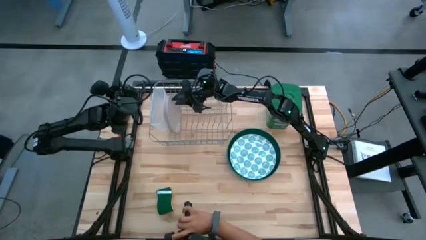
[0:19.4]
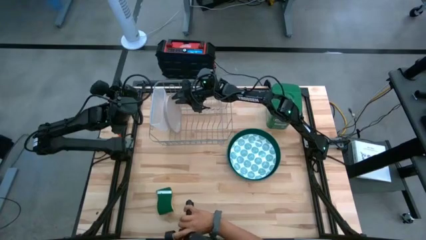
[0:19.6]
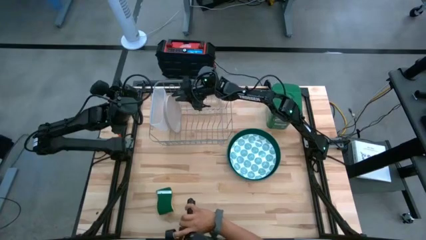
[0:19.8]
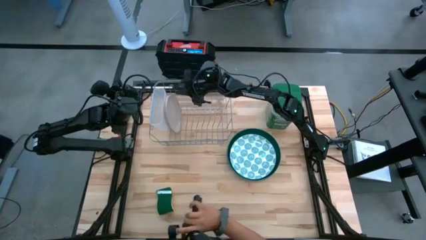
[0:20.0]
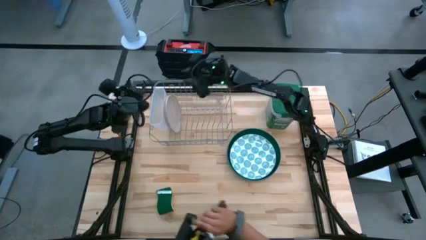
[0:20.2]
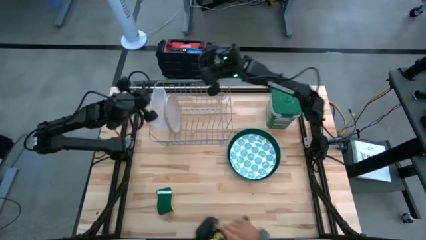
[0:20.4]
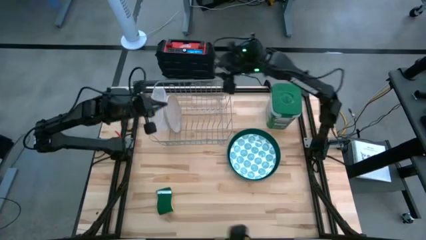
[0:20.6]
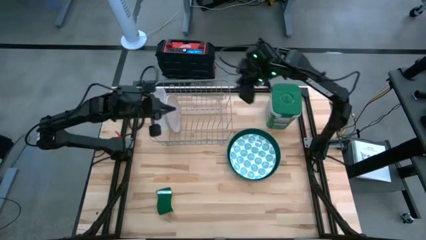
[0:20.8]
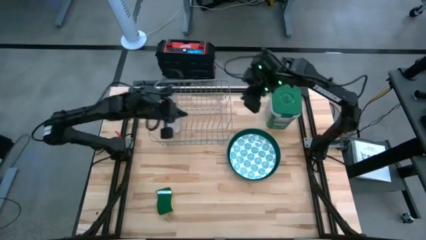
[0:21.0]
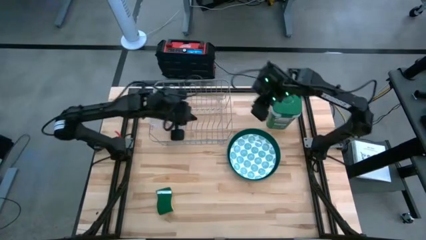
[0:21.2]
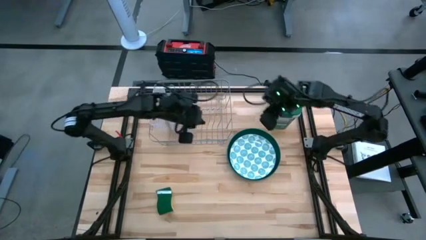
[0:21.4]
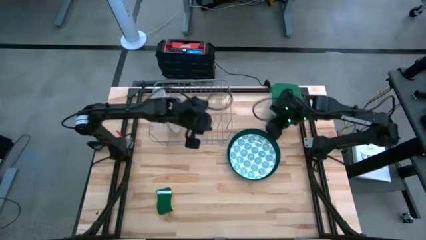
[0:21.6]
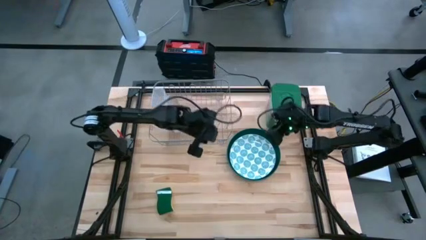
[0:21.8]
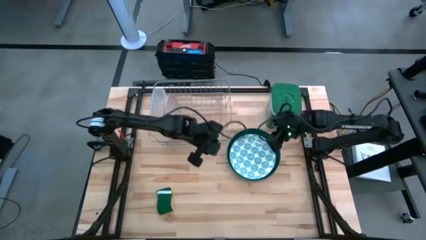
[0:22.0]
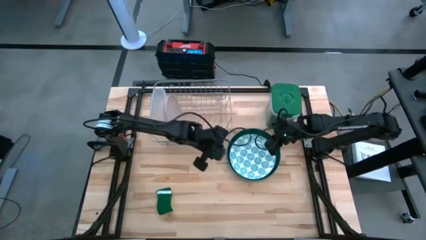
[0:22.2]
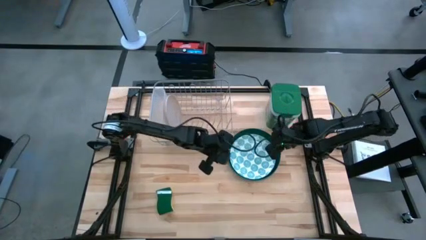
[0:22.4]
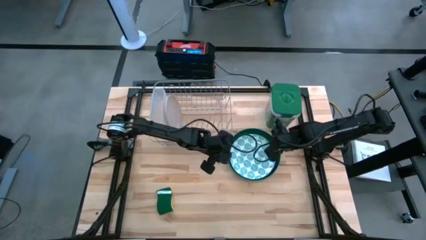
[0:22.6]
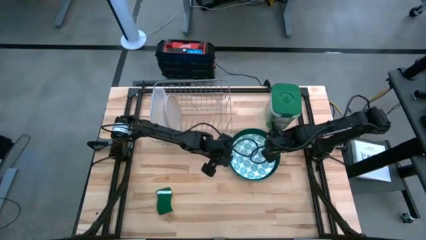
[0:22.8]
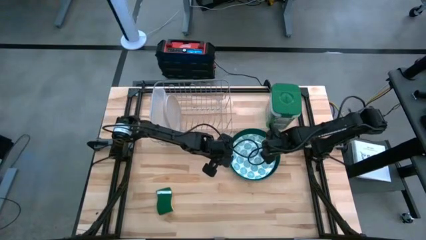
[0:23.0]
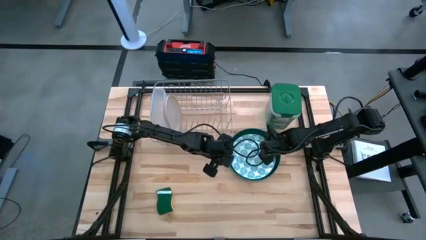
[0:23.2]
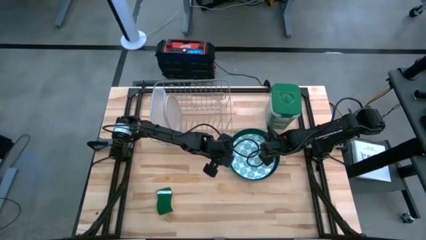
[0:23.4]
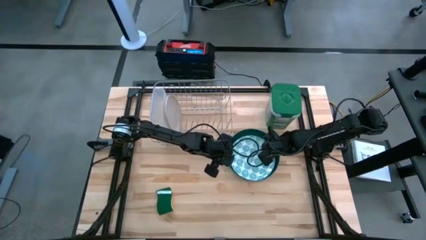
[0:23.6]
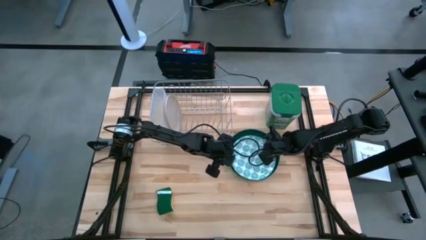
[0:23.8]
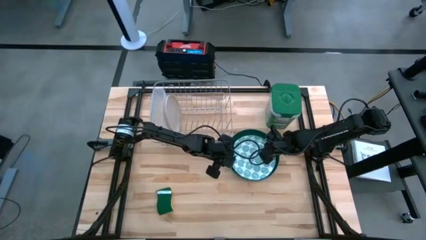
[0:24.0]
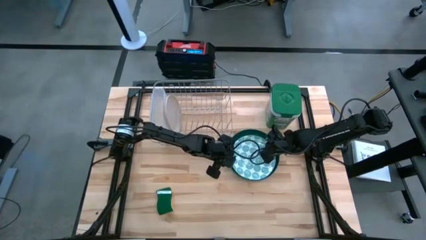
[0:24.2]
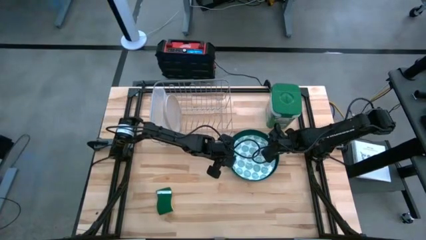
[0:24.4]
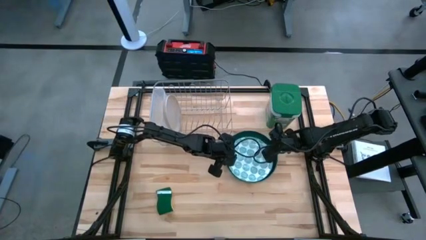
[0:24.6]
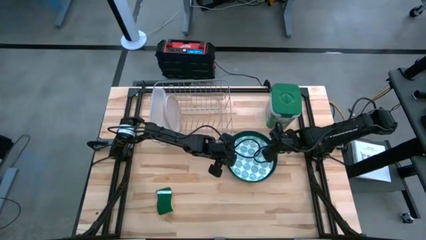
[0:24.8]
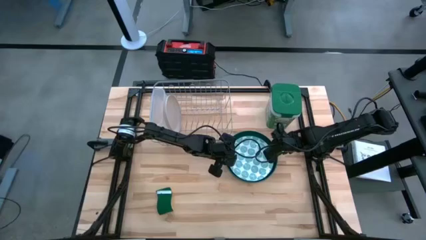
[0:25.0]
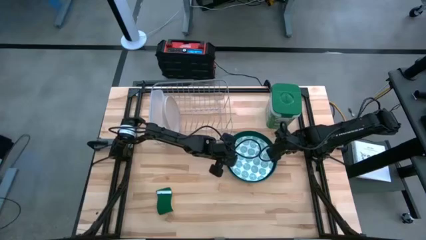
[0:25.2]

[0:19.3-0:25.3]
Task: Sort dishes
Put the blue patterned plate on the dish rack

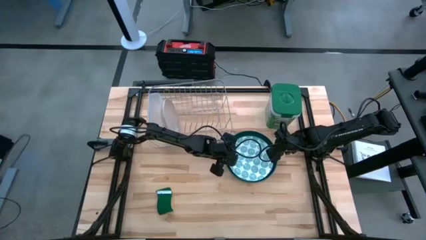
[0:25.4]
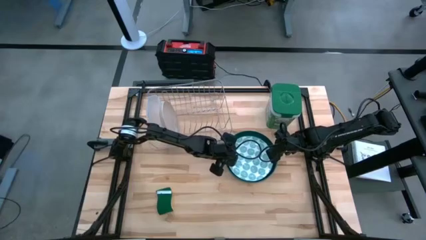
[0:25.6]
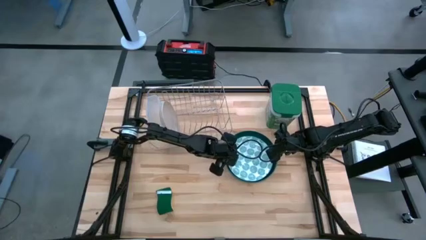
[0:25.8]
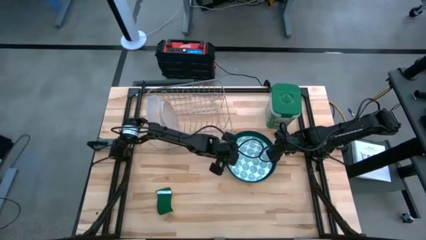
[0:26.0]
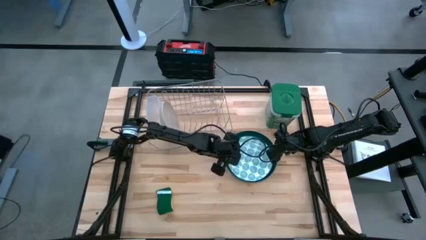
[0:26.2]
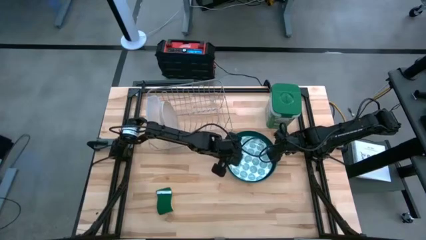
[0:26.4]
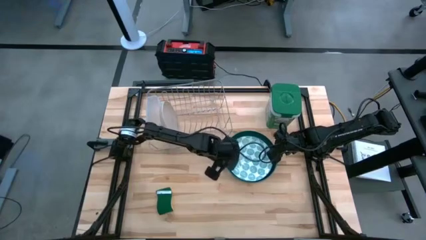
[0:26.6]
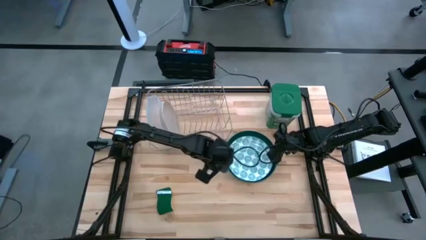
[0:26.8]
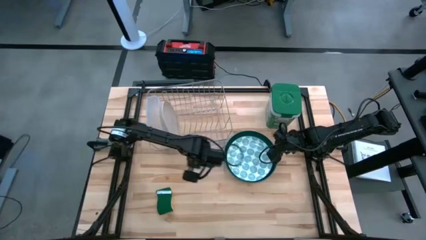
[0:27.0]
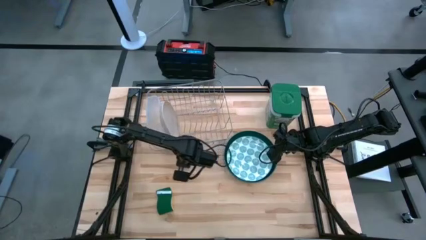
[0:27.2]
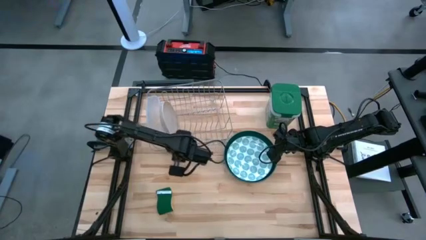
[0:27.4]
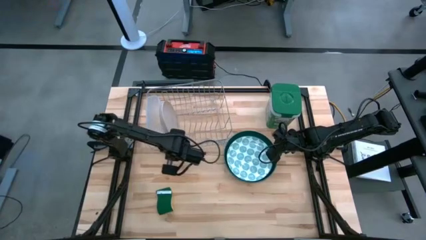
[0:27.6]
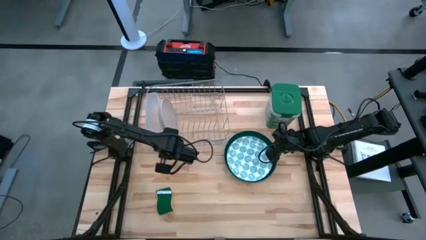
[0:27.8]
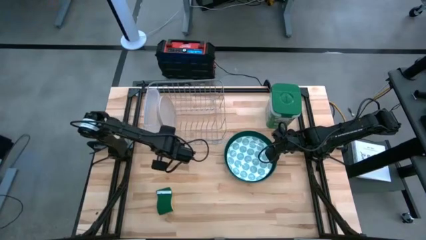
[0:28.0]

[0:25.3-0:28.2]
Adjust the dish rack

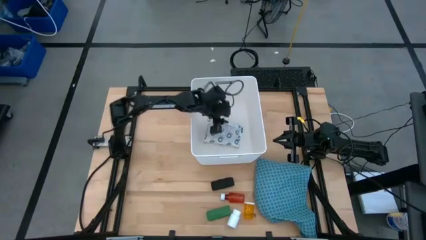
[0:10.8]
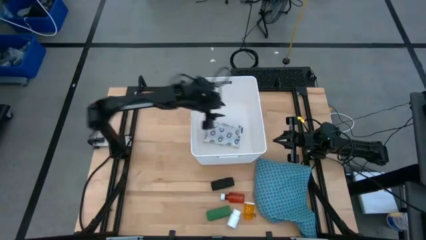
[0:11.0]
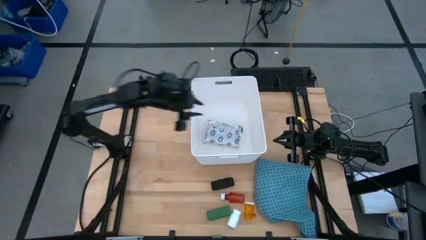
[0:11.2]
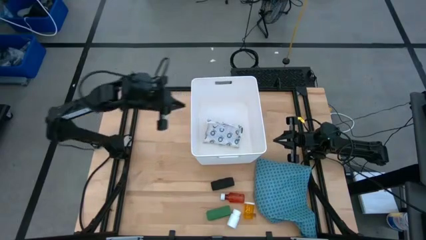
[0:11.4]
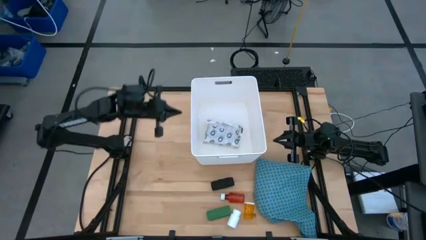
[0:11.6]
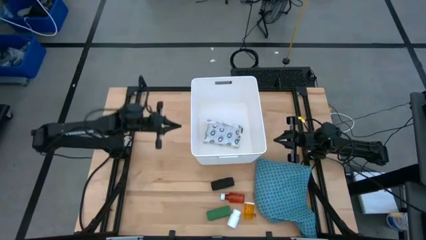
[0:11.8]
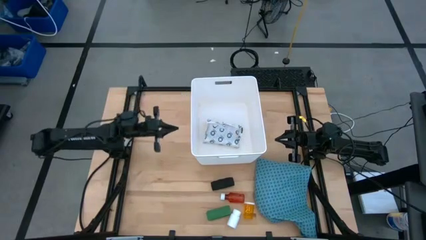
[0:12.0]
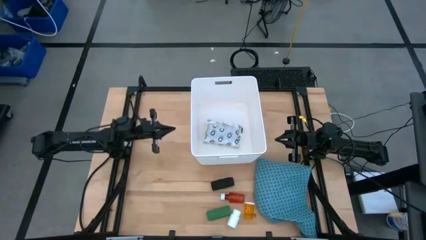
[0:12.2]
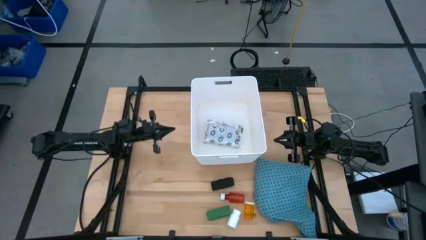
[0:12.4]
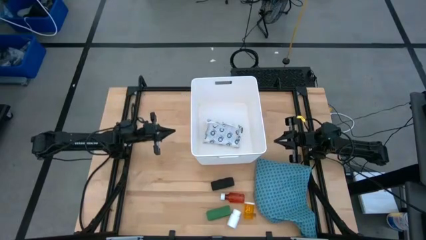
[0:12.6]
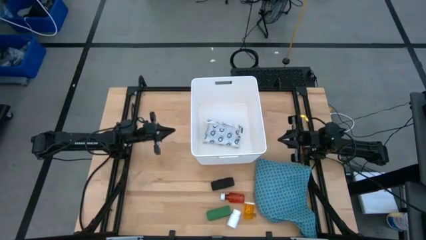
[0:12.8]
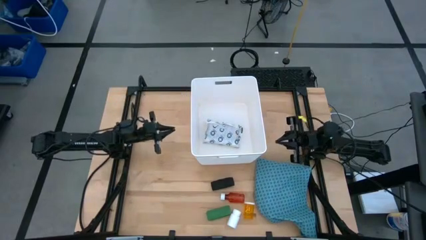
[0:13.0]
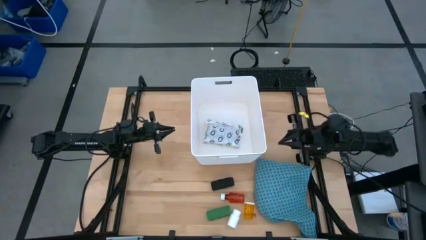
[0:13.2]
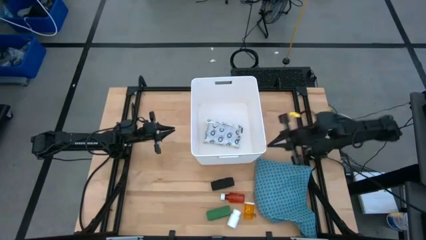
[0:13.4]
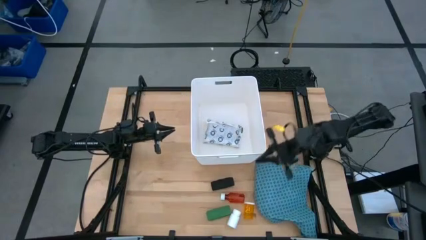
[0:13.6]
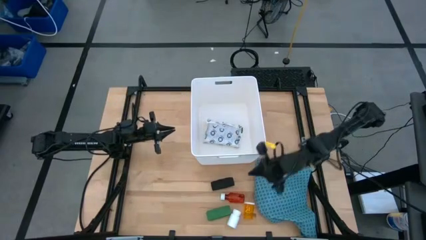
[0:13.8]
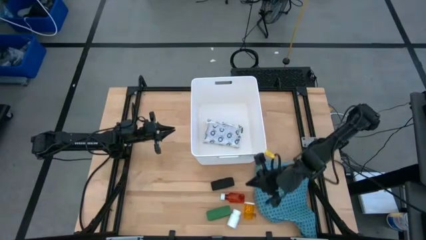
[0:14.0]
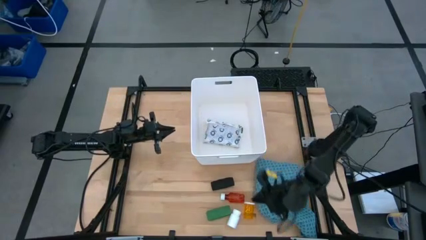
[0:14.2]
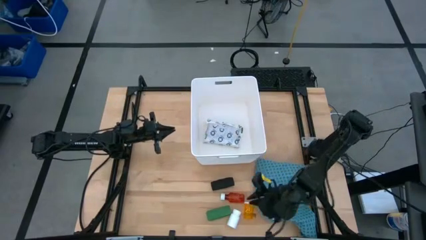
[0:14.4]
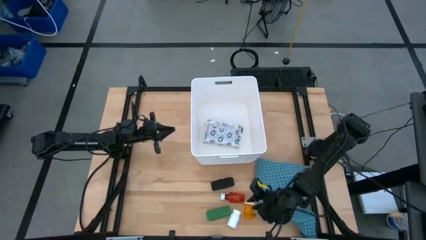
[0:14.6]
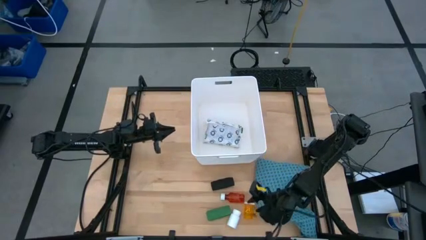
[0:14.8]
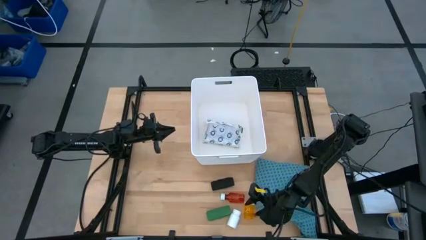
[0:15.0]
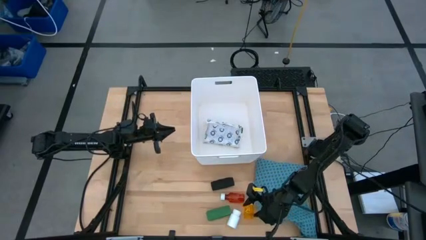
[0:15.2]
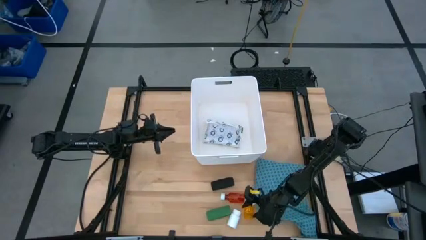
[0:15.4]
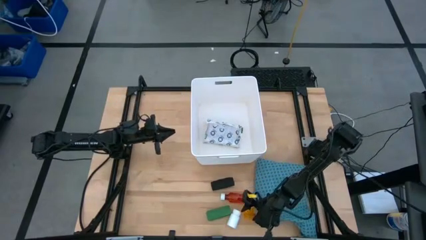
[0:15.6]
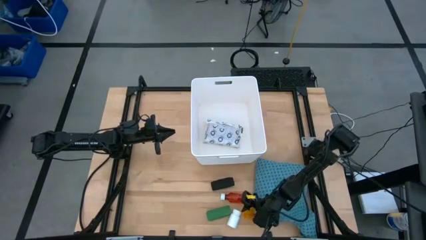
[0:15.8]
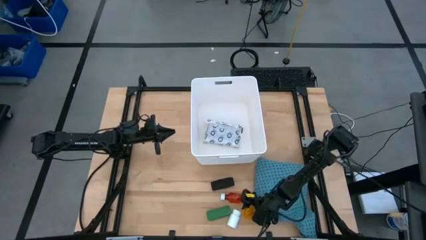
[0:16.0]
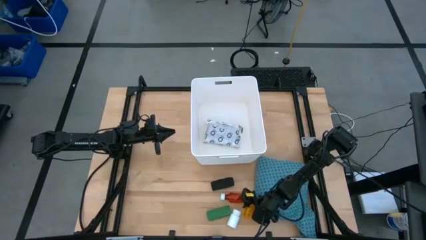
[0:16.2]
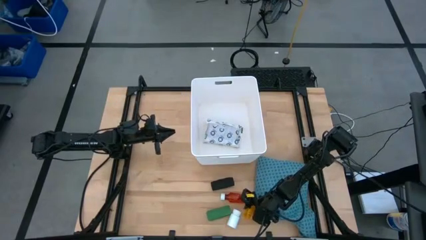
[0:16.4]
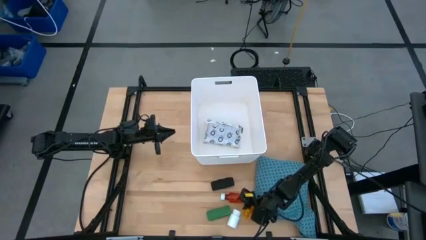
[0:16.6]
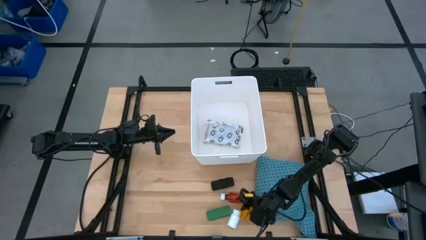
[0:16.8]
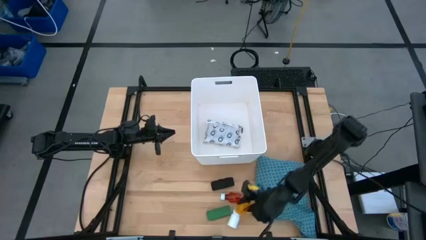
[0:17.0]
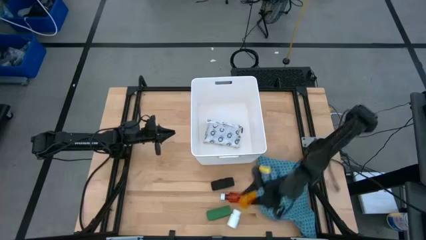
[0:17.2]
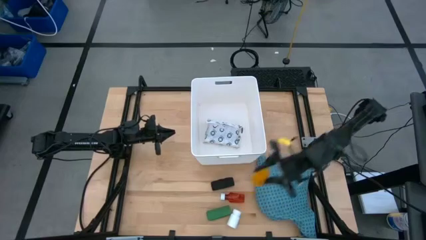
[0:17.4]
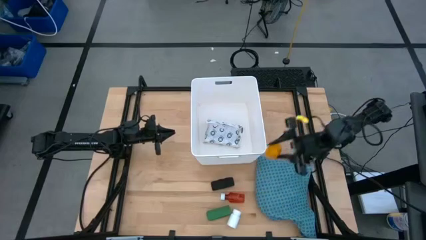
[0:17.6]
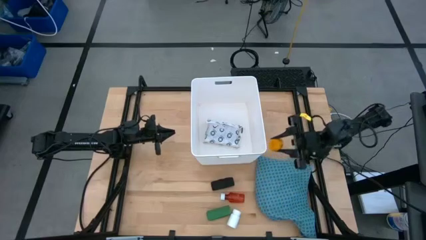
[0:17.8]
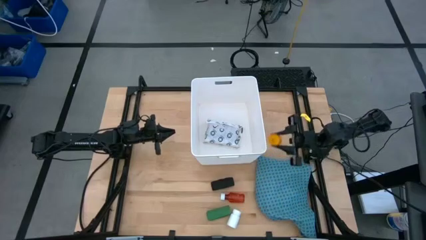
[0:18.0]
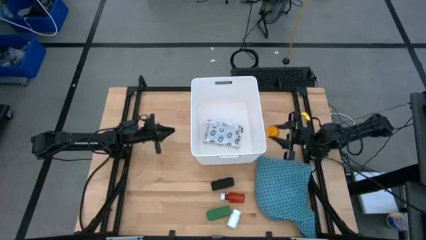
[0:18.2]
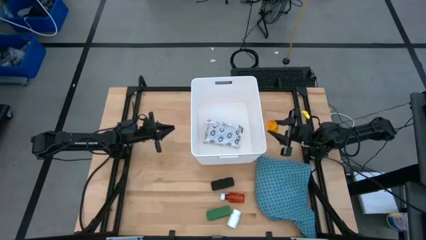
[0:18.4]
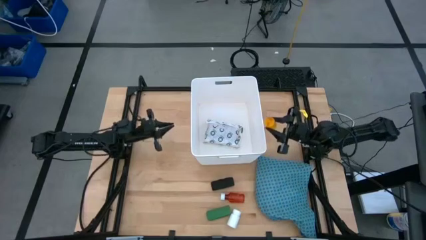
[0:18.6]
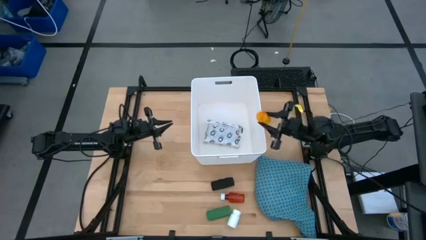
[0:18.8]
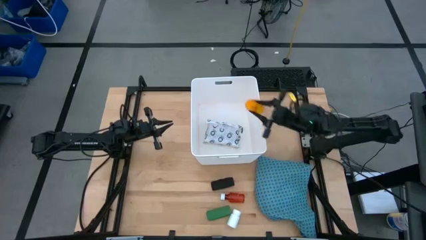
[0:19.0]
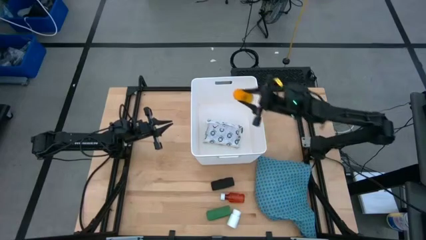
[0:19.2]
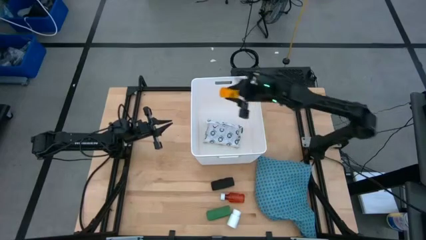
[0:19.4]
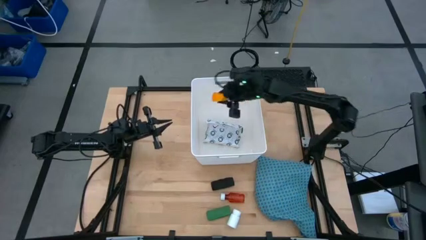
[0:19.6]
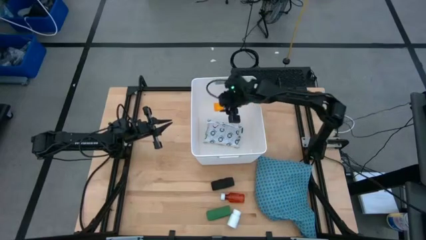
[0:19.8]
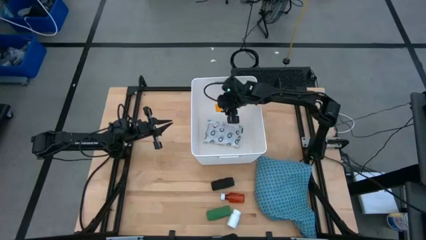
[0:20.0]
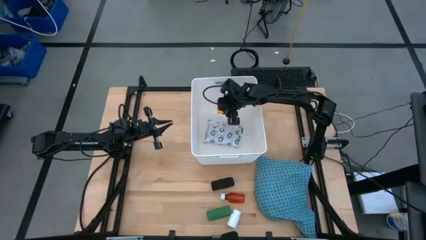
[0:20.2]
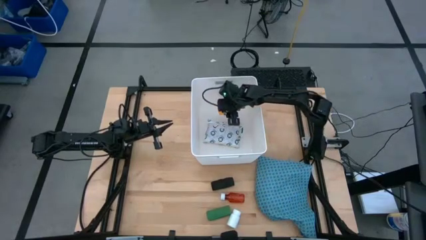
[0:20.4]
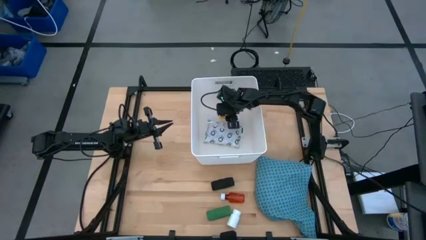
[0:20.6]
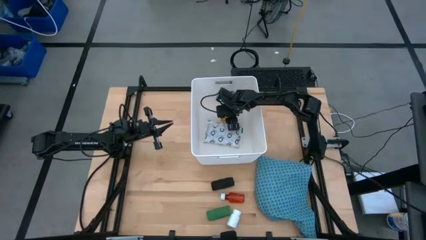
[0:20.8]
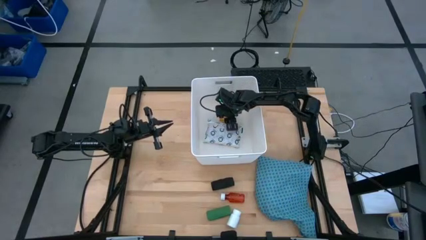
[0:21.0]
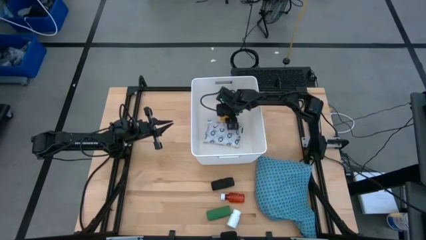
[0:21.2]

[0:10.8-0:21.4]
Task: Pick & place medical supplies in basket/bin
Put the orange pill bottle into the white bin
